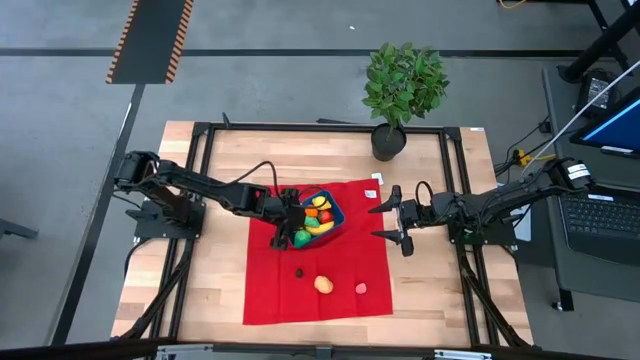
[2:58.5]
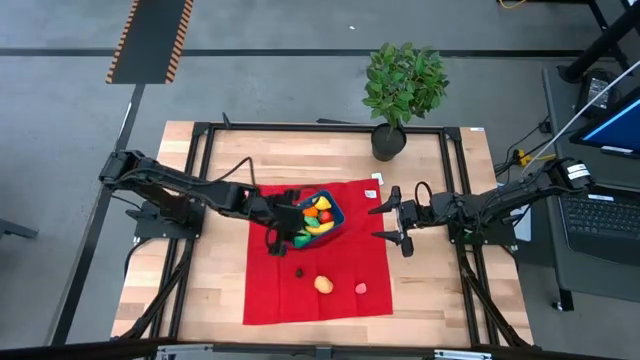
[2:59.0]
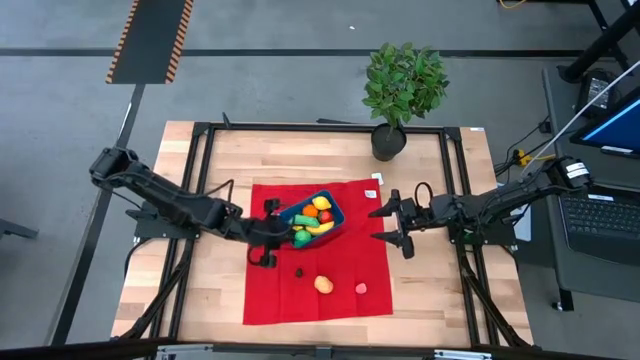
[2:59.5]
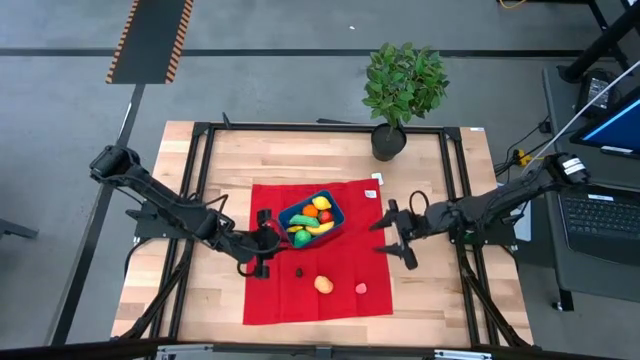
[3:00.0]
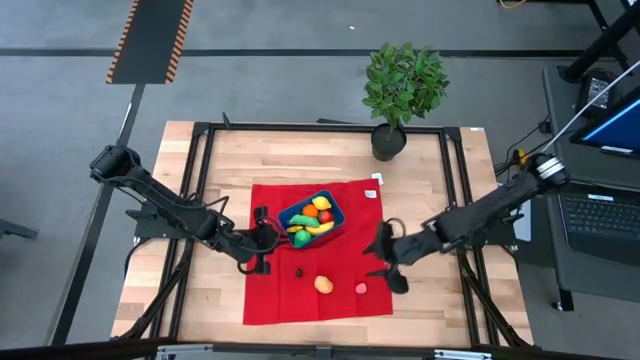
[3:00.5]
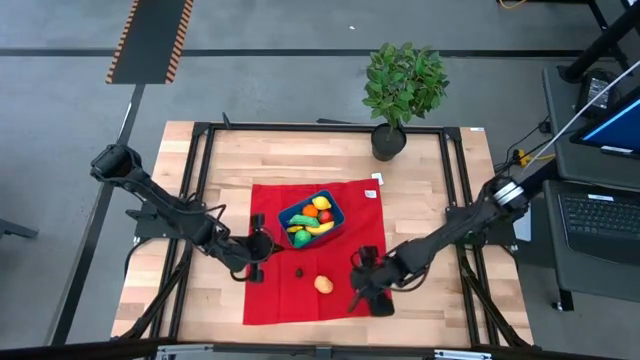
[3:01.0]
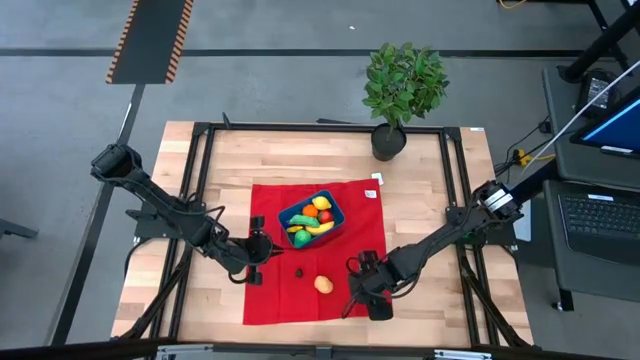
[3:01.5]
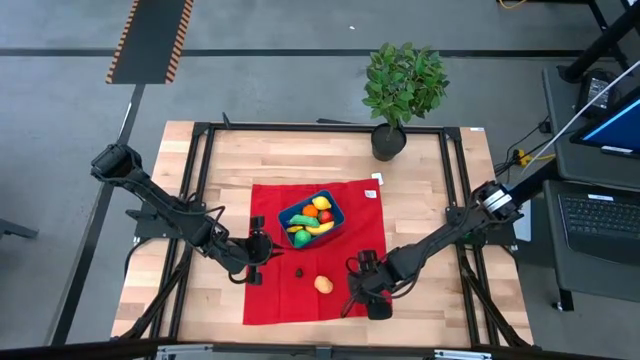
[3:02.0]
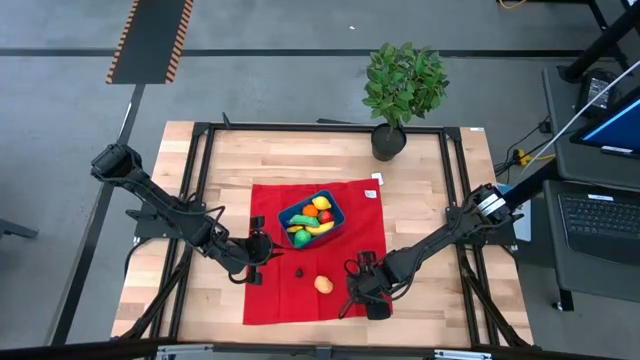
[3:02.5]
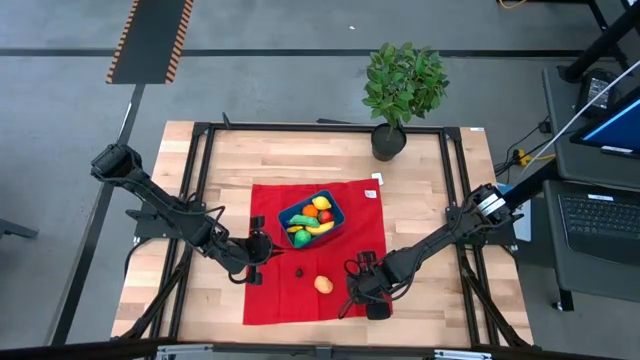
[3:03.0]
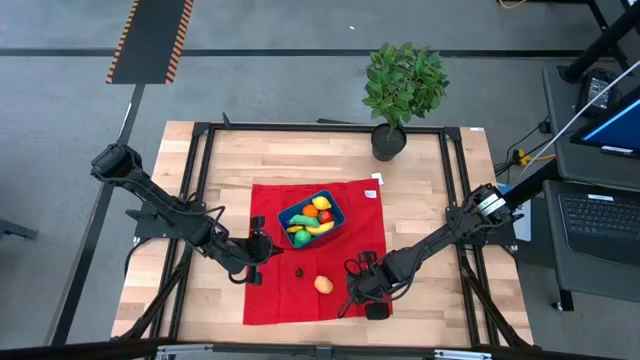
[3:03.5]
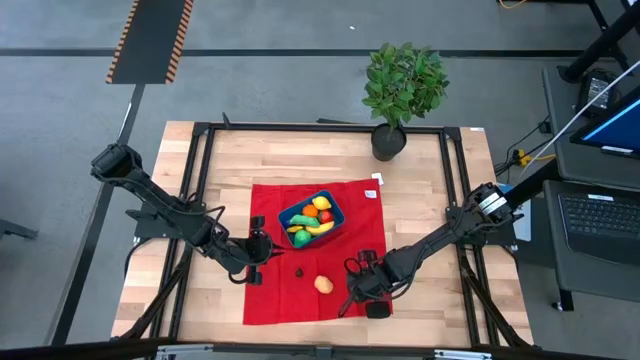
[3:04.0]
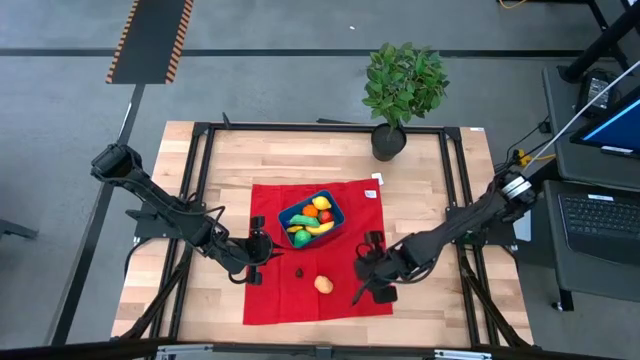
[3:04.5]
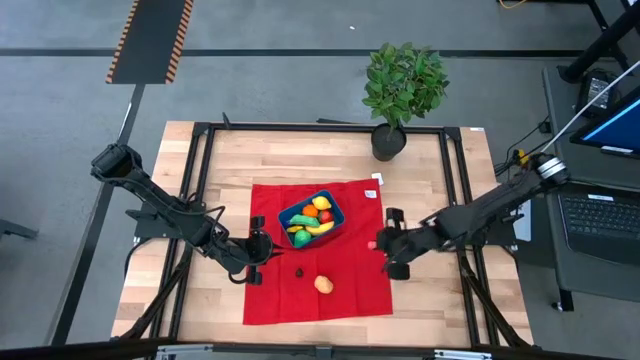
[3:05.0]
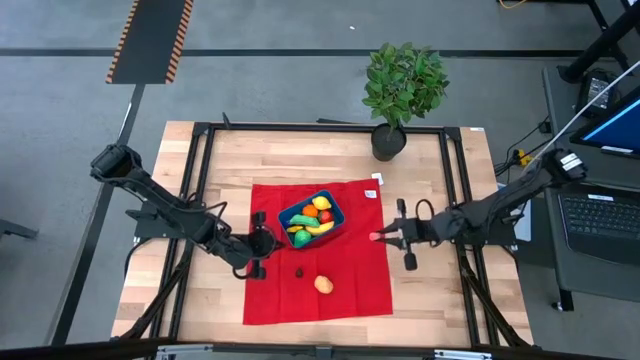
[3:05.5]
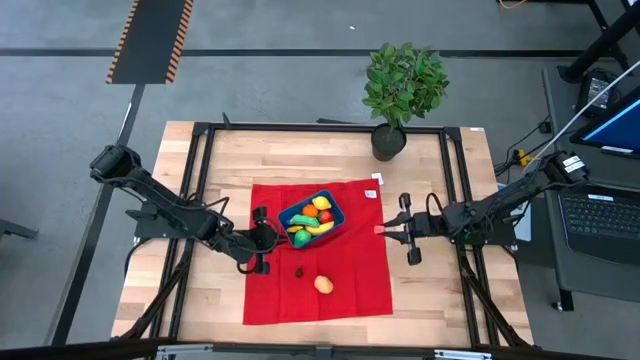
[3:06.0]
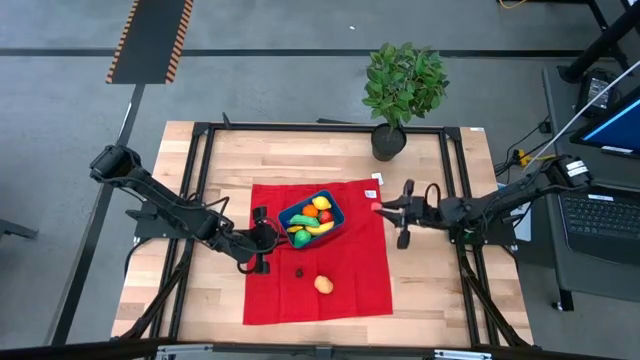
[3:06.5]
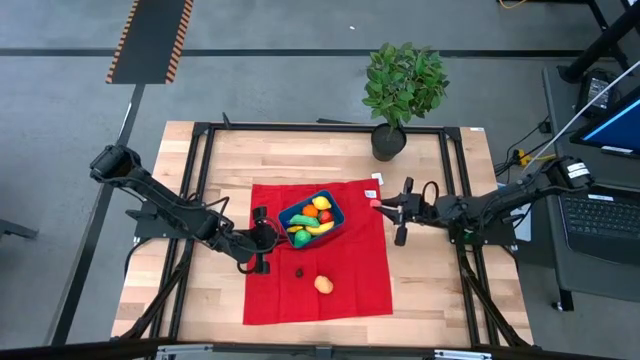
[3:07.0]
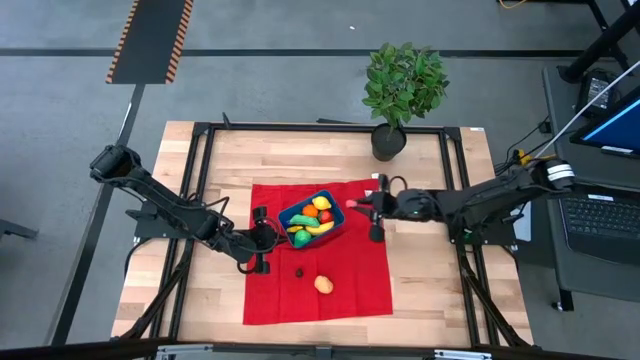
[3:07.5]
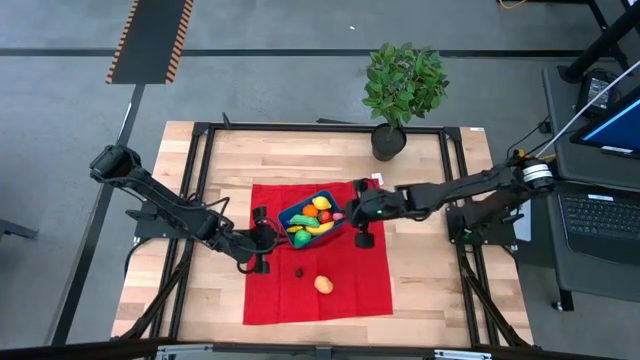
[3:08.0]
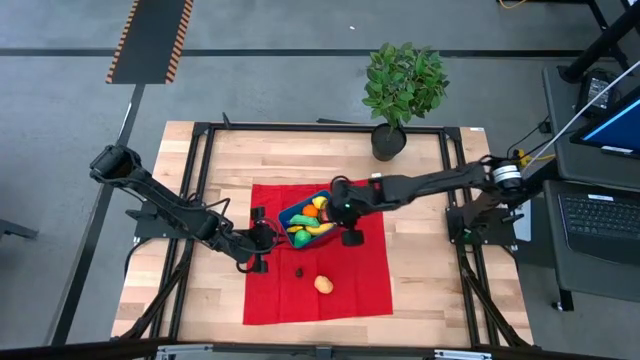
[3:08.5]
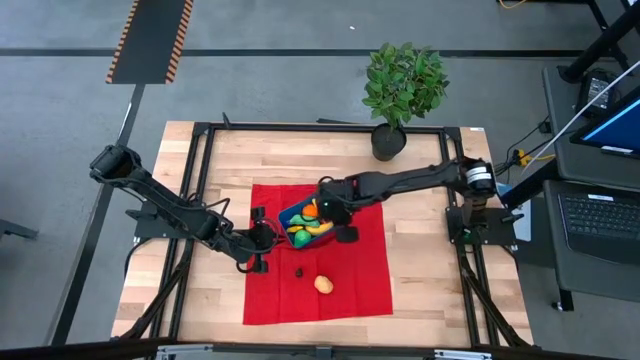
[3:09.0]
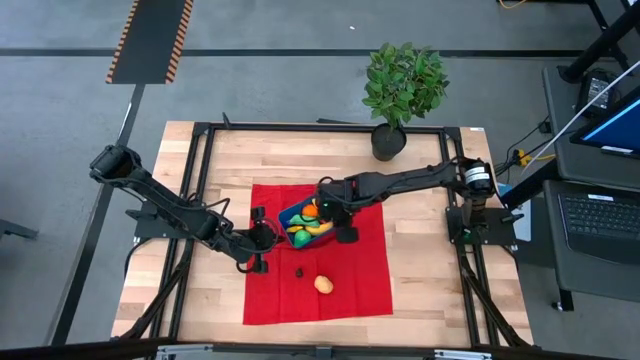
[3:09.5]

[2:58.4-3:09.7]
Task: Pick and placing Produce into tupperware
Put the peach into the blue bin

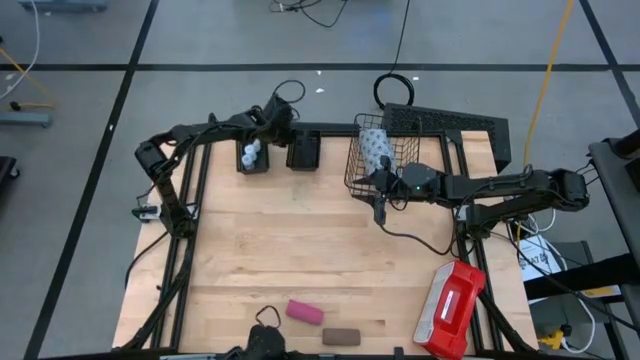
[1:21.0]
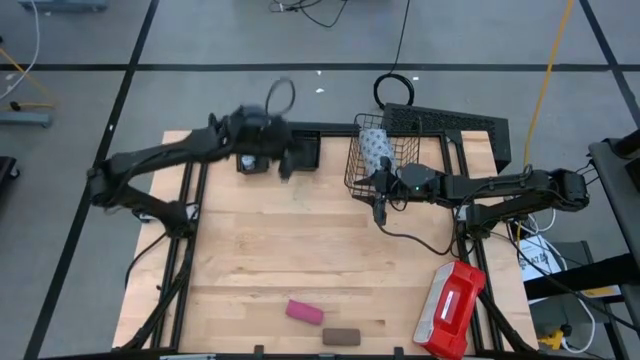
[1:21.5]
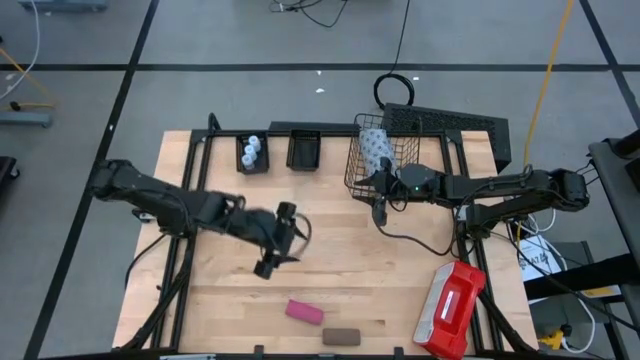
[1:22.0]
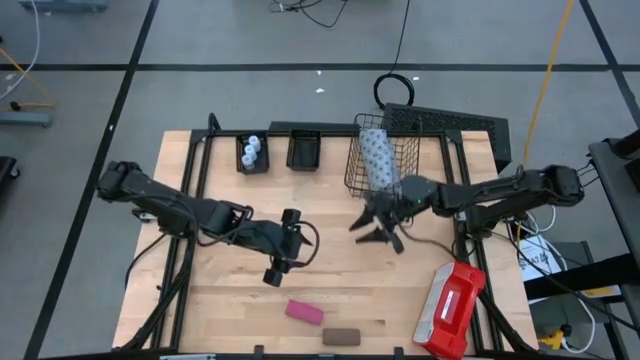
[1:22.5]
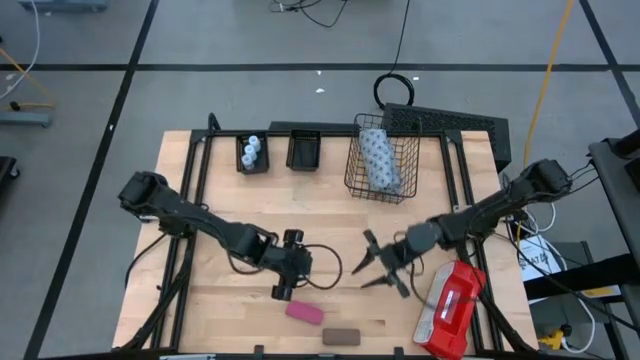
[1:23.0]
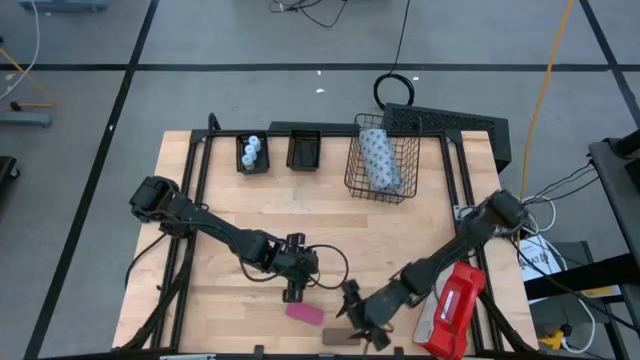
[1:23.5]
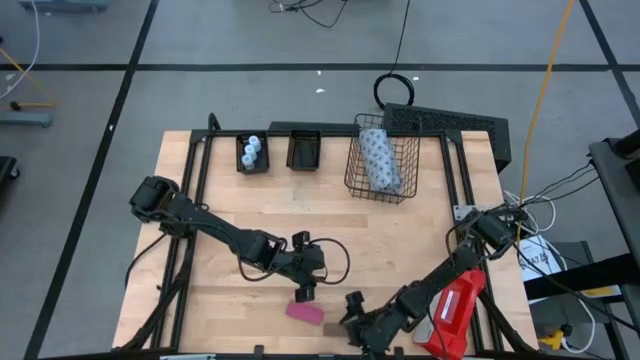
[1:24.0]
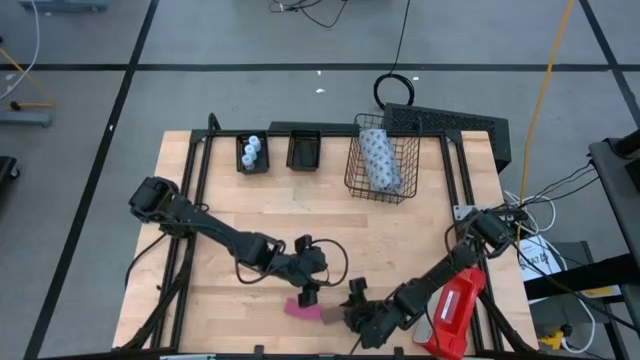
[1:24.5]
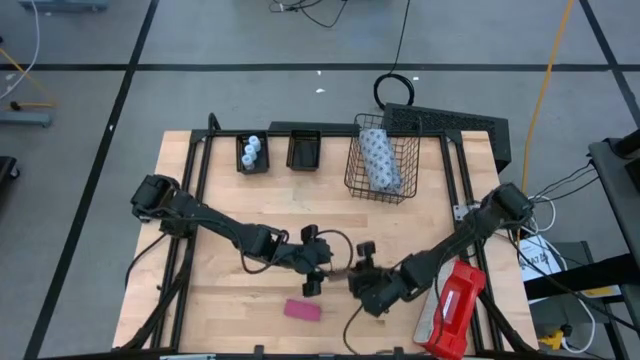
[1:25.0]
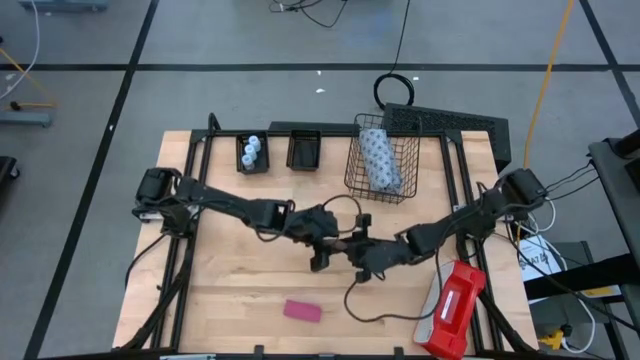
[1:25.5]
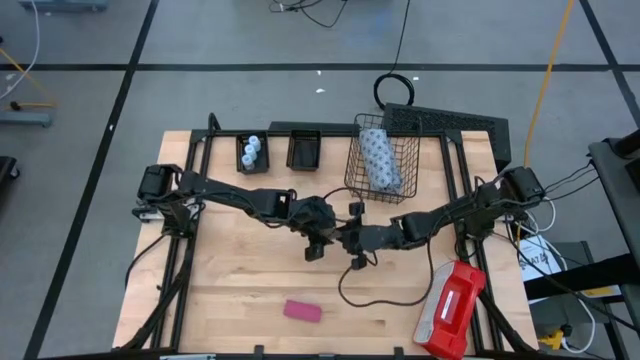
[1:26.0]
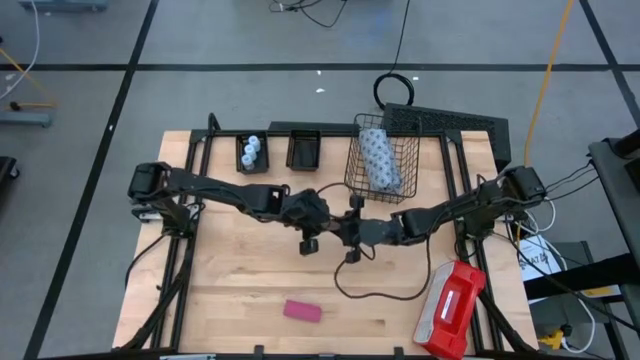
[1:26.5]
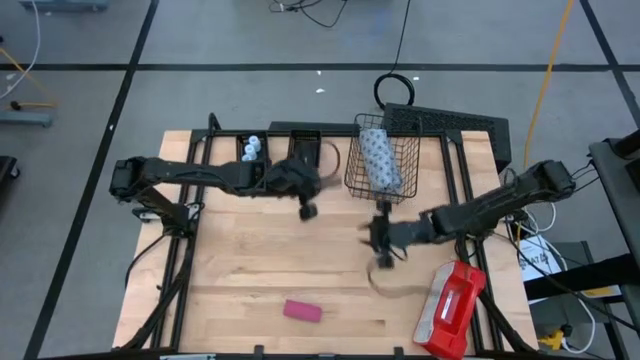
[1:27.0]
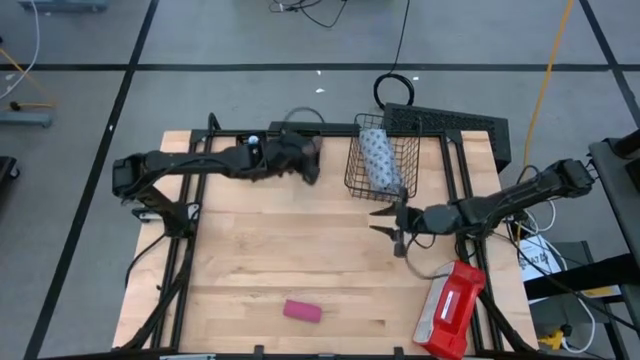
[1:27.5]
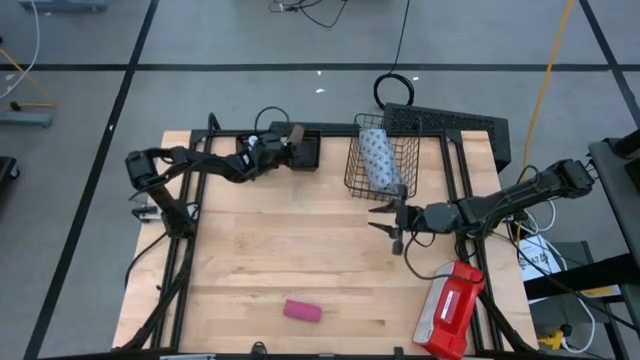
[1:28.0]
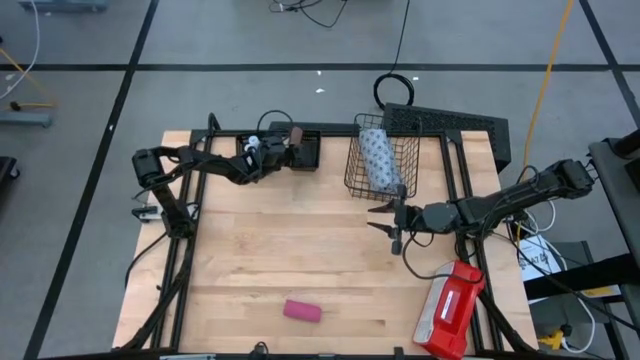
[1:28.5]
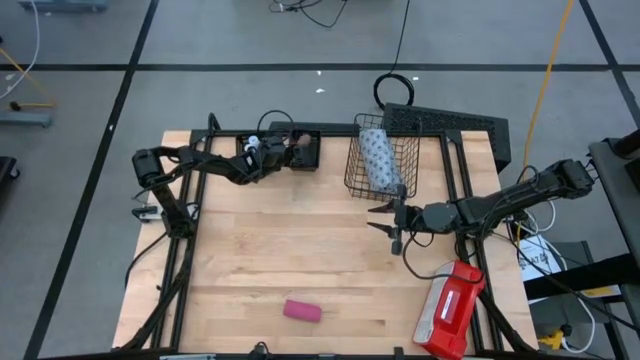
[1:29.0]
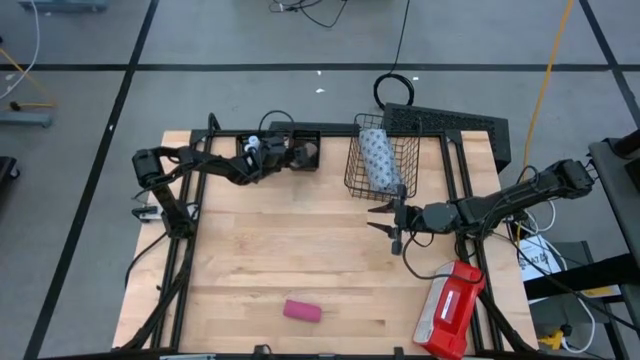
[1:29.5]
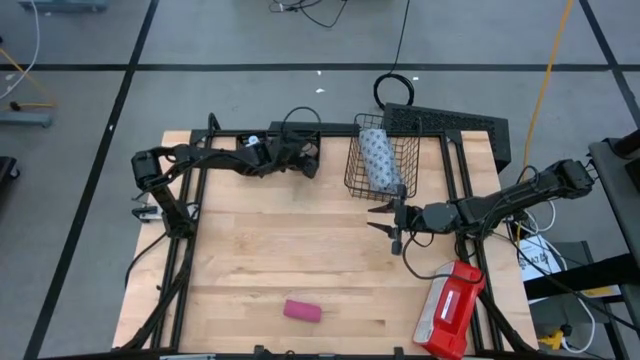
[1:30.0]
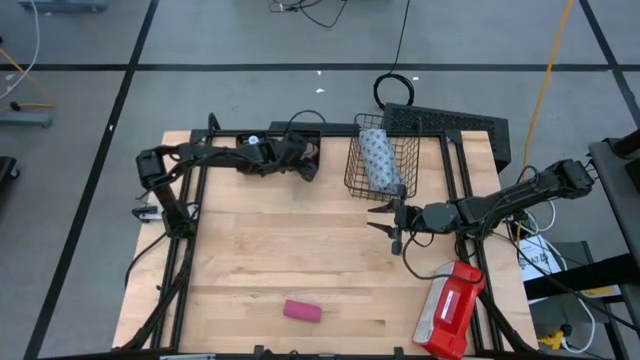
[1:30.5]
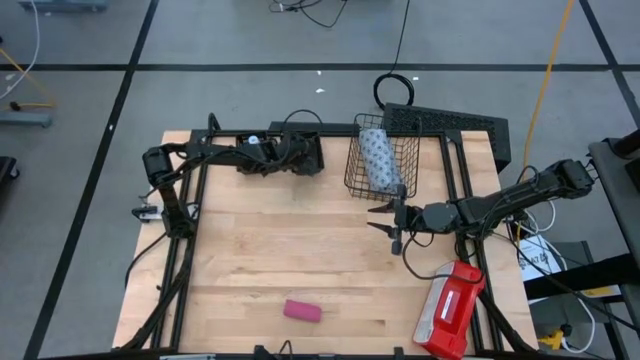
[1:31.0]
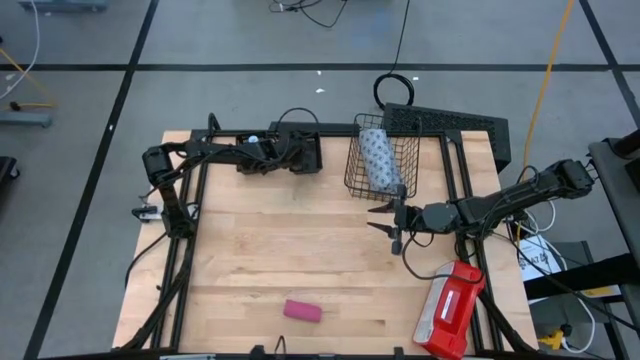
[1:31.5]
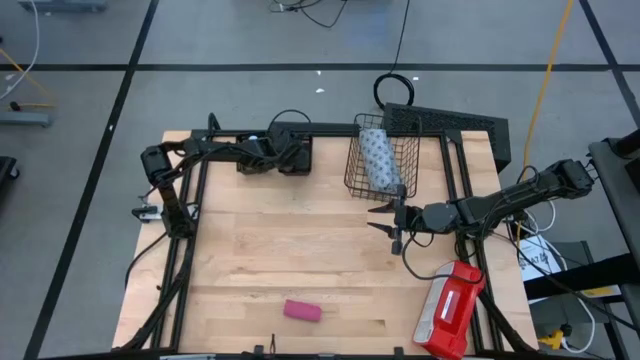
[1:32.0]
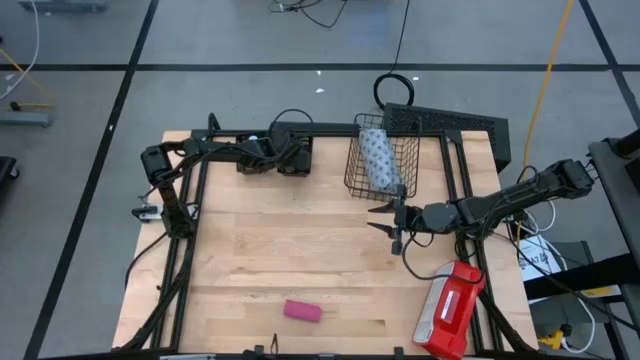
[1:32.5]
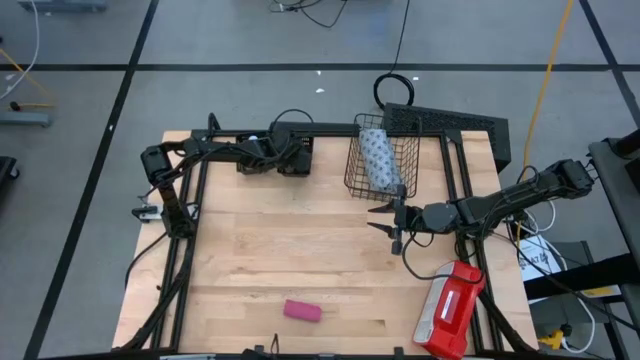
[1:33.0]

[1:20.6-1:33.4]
Task: Pick & place medical supplies in basket/bin
Put the brown rolled bandage into the right black basket
